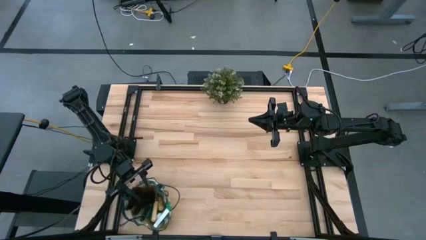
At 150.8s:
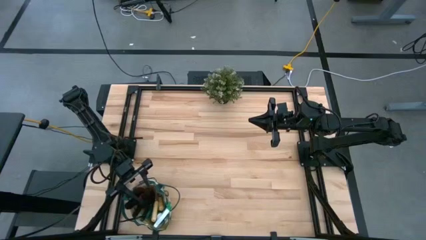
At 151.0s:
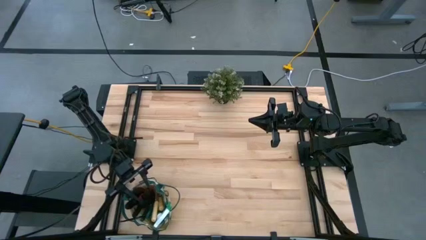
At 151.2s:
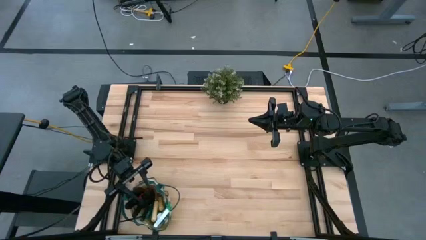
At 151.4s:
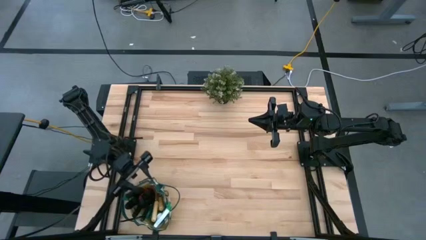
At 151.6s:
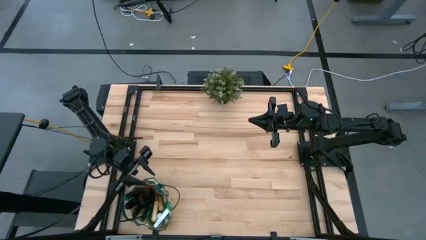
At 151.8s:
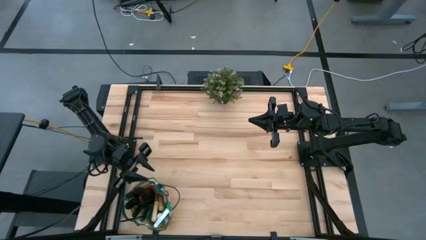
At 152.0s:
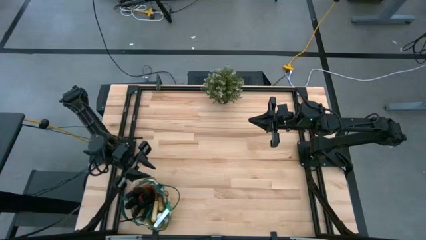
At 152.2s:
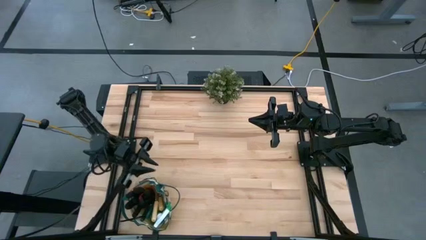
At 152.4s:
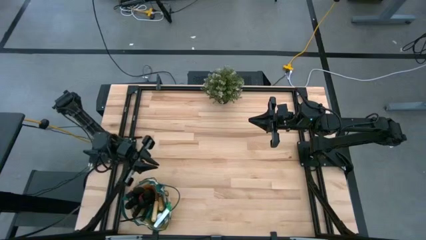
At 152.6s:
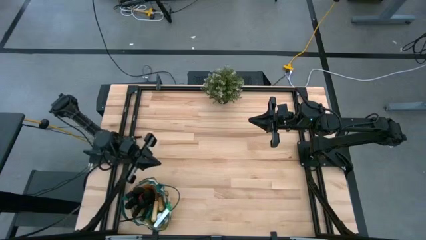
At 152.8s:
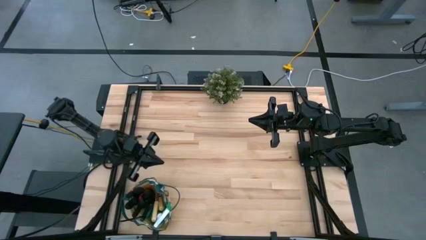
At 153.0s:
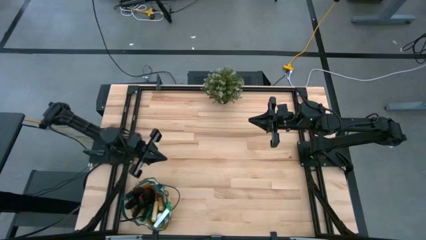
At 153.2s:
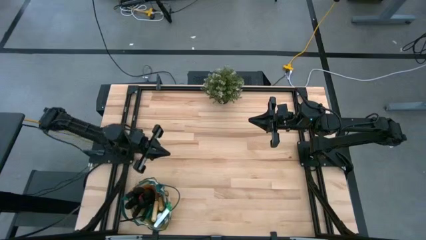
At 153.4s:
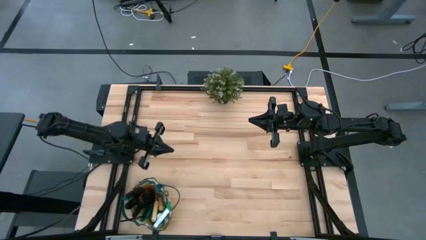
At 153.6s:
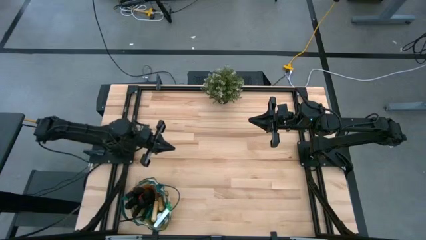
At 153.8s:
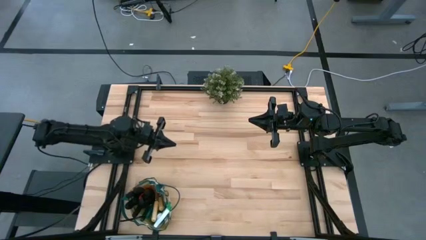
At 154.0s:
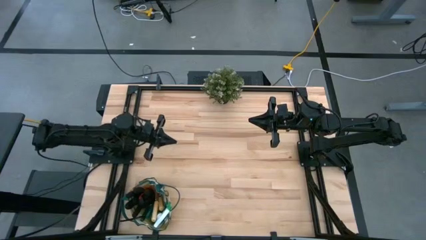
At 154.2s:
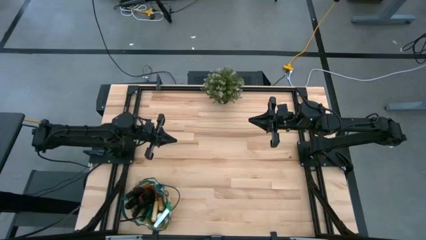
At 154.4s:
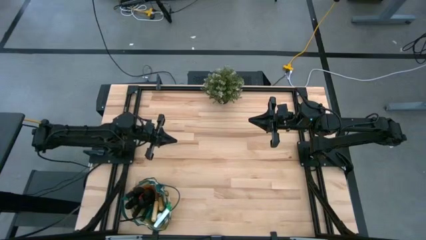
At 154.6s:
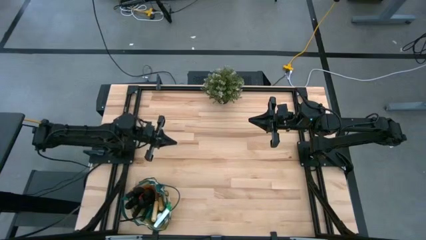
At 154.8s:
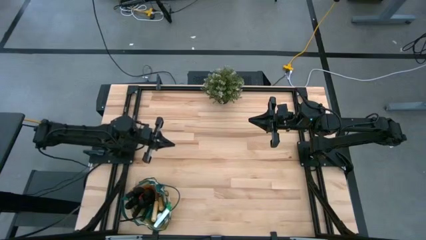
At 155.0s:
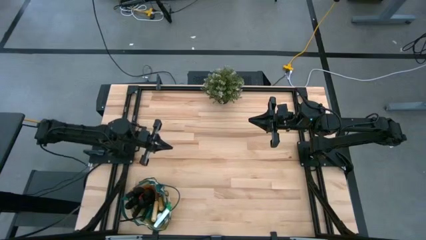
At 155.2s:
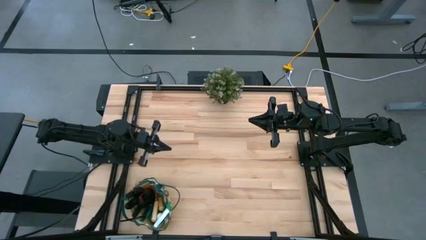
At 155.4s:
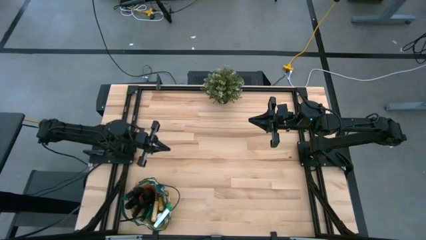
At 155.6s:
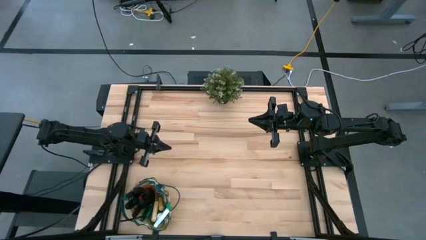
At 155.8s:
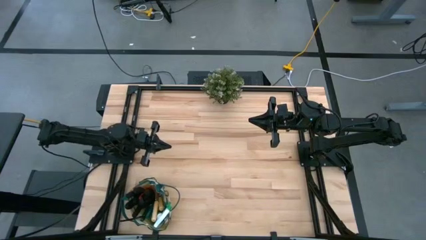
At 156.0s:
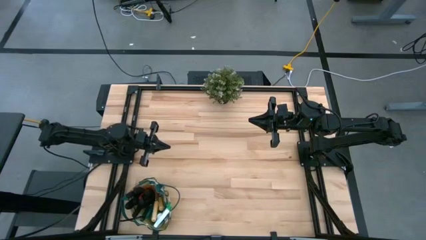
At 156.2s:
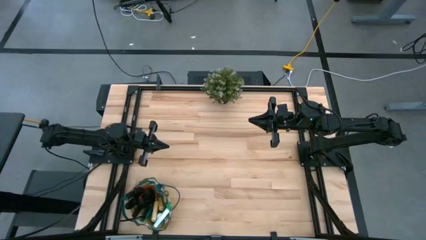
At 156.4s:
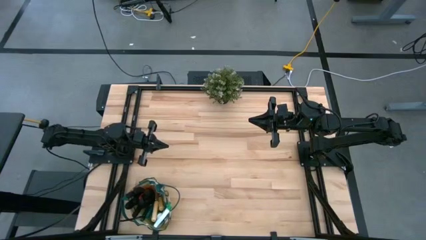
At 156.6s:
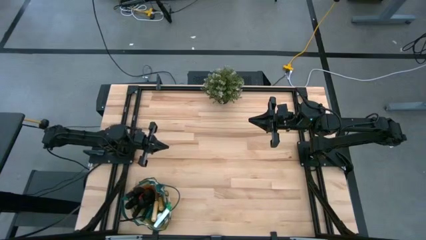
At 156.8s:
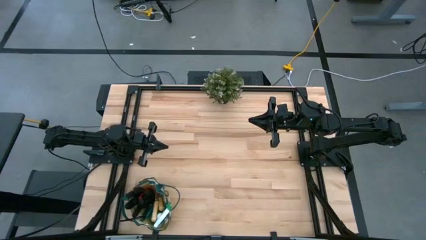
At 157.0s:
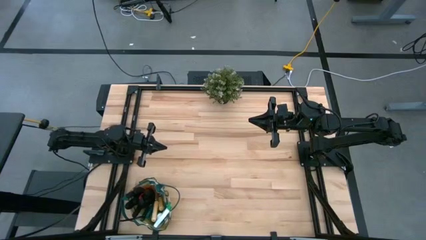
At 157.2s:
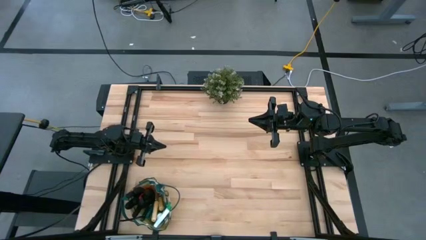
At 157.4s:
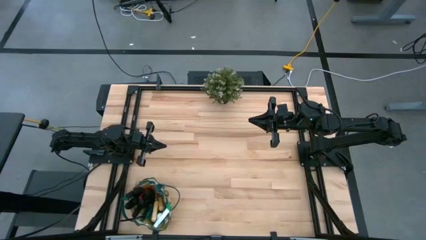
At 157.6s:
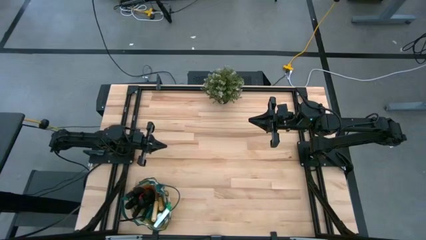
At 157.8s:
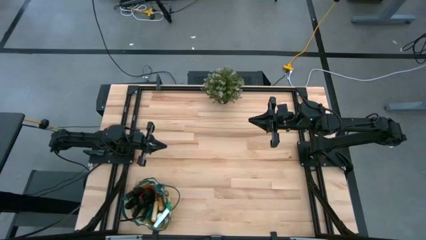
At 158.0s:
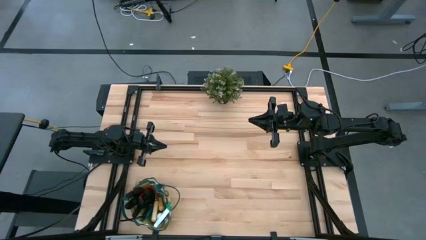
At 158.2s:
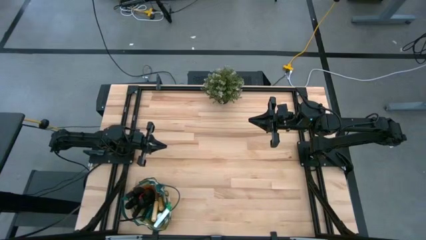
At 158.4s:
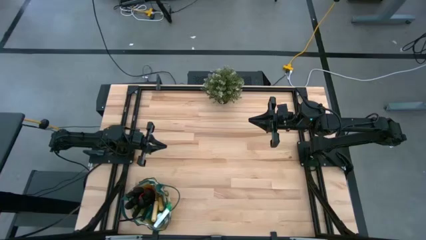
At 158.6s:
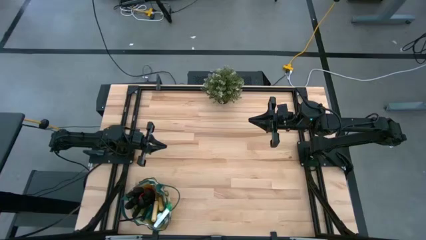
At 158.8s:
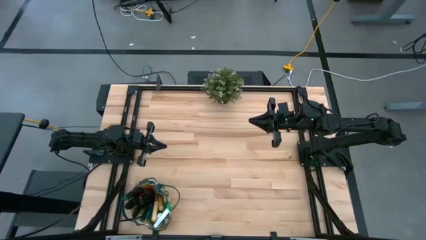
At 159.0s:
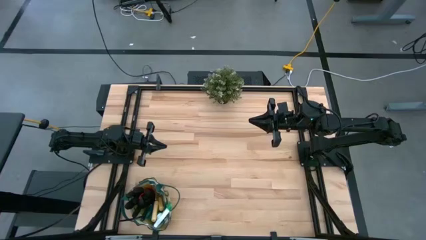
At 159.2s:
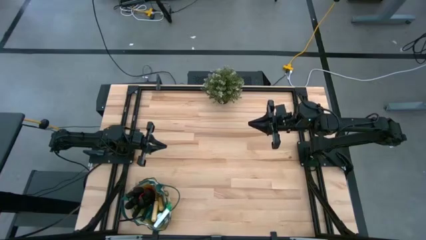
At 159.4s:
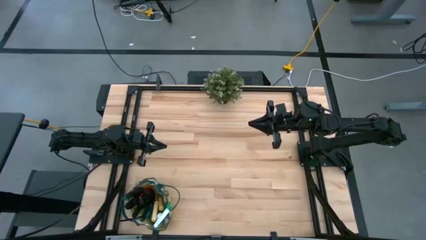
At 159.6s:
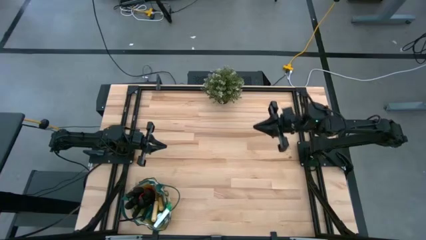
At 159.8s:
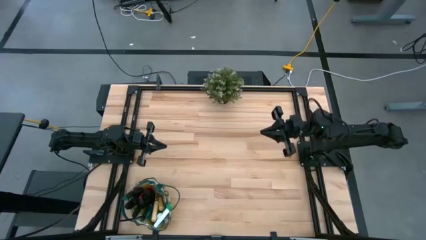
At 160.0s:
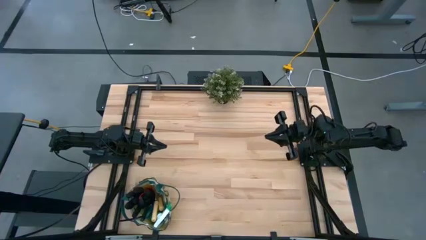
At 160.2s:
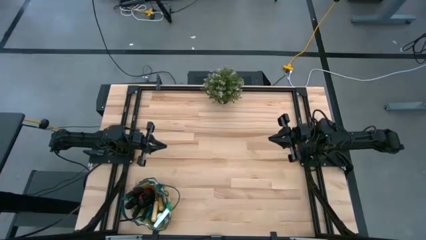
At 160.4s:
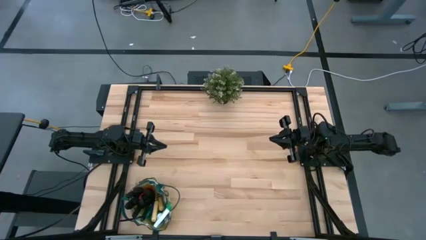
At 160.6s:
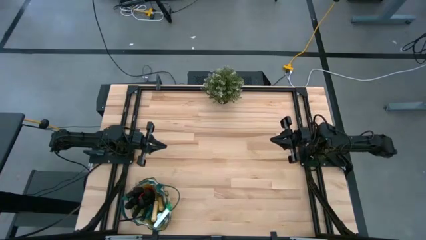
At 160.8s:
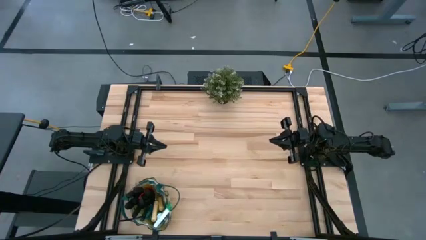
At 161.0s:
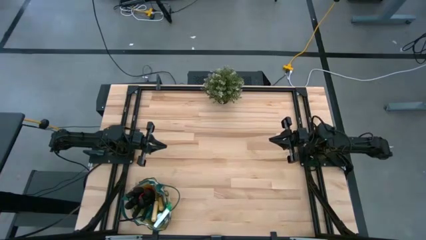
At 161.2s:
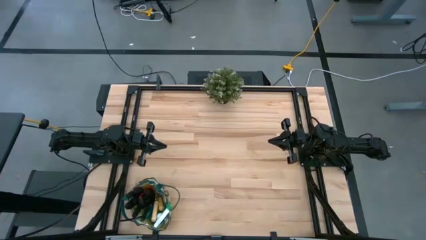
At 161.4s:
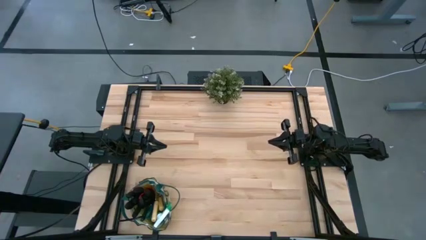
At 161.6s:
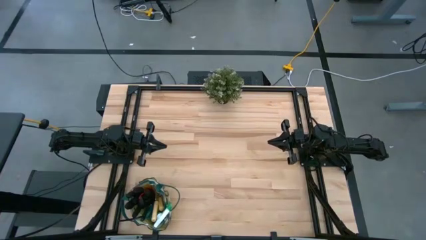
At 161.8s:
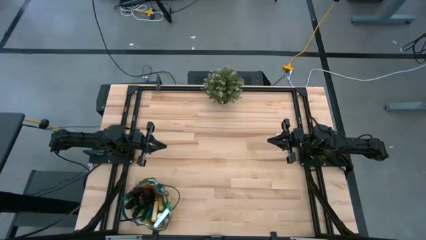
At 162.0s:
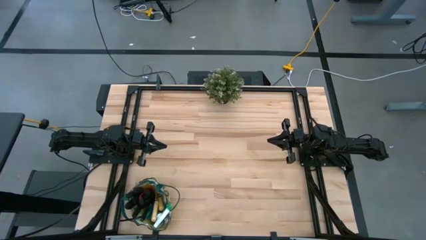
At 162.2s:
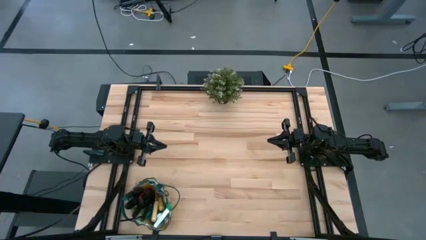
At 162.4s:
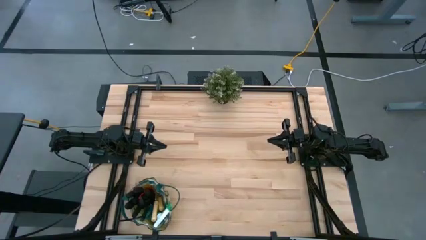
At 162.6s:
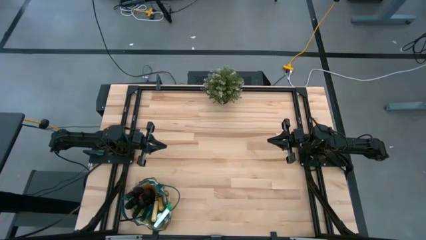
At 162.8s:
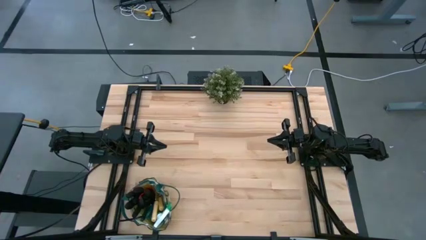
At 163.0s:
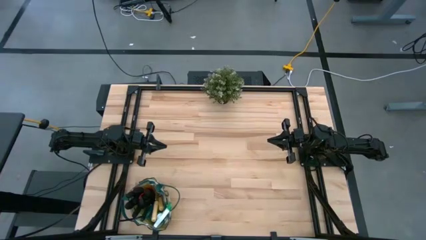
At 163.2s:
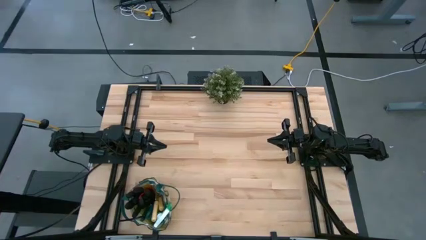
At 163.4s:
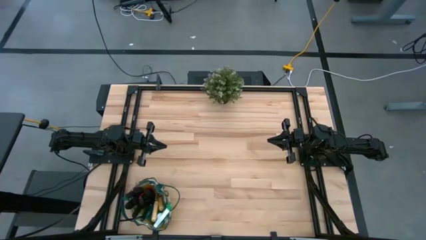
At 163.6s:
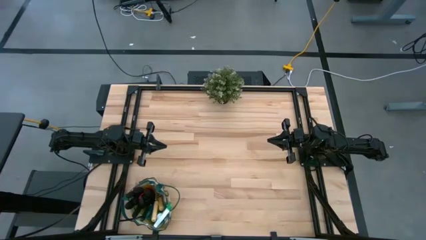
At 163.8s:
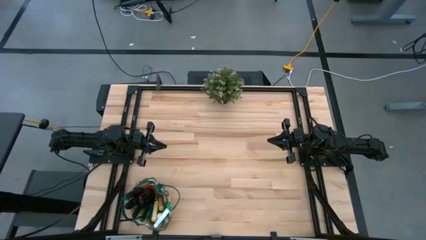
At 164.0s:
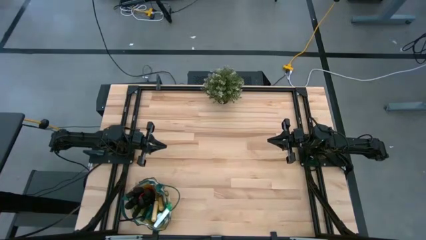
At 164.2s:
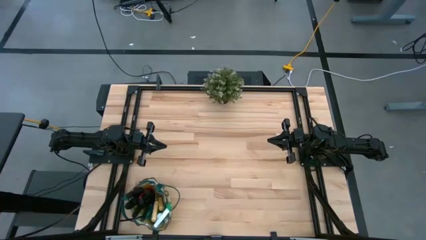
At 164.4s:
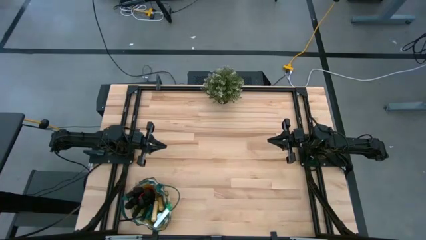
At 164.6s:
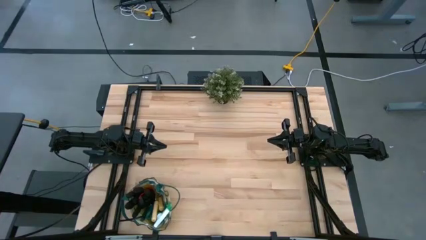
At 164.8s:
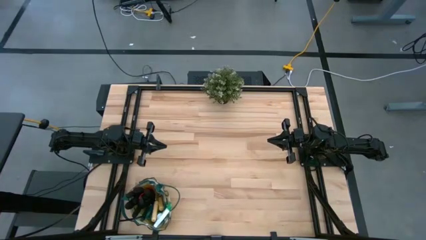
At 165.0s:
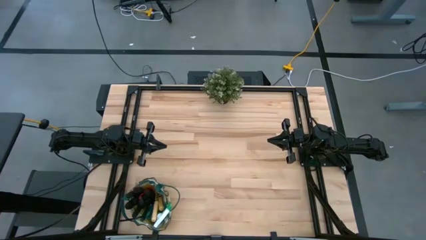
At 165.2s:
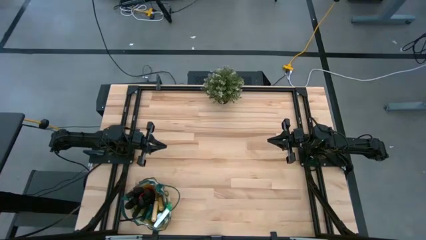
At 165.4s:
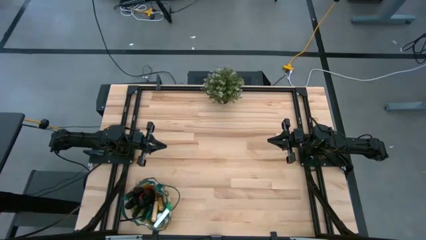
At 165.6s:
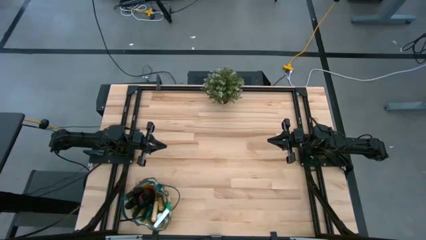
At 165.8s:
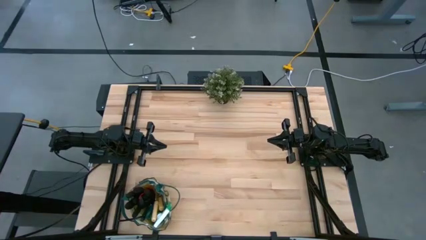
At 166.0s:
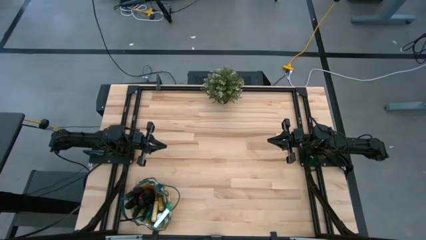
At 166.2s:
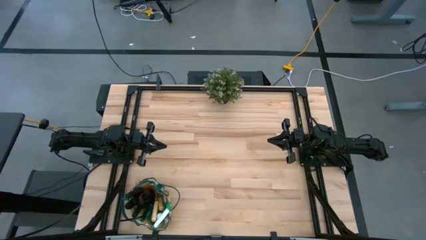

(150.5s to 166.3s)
Task: Pick & Place Garden tools in Gardening bag
Return to Home Position

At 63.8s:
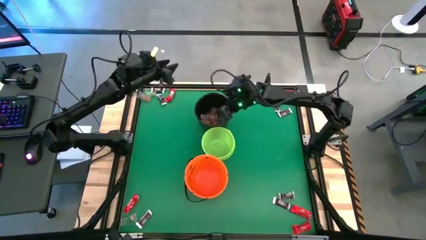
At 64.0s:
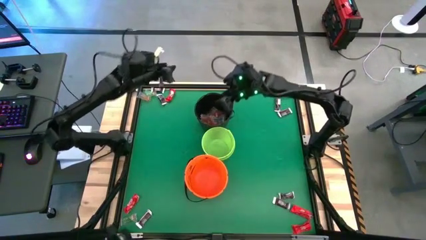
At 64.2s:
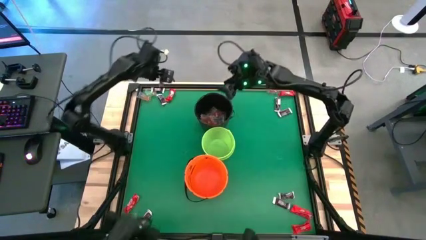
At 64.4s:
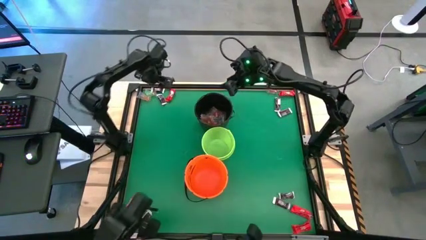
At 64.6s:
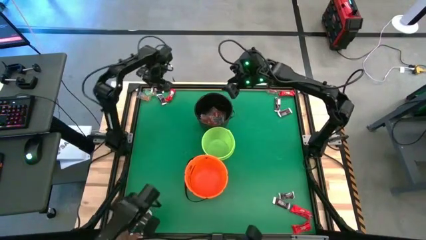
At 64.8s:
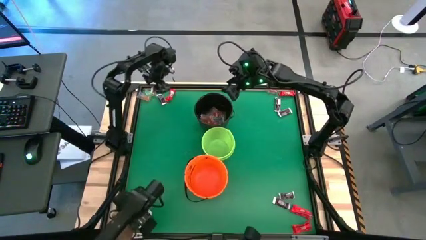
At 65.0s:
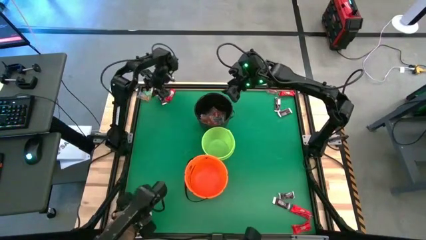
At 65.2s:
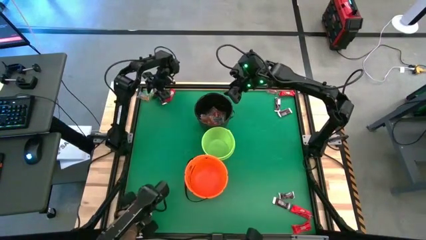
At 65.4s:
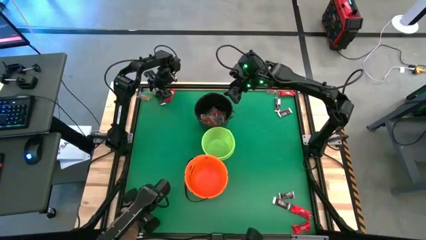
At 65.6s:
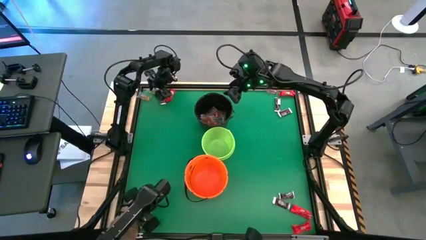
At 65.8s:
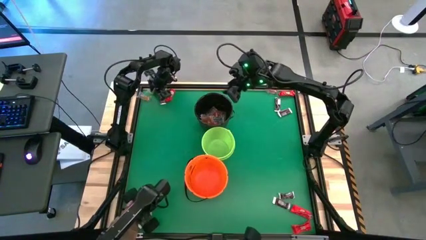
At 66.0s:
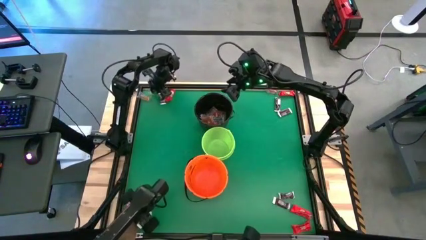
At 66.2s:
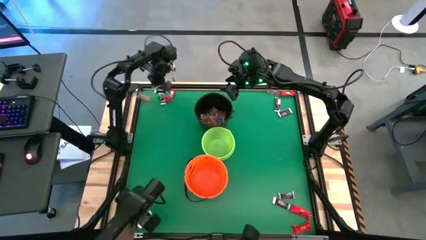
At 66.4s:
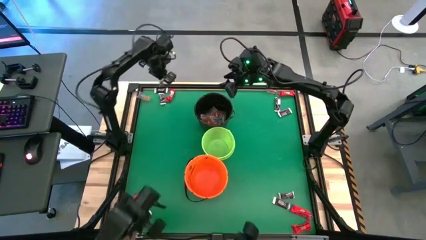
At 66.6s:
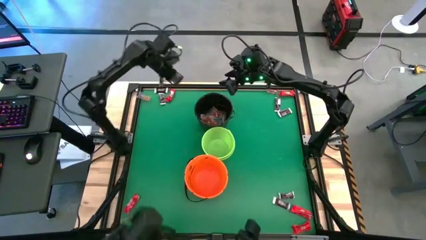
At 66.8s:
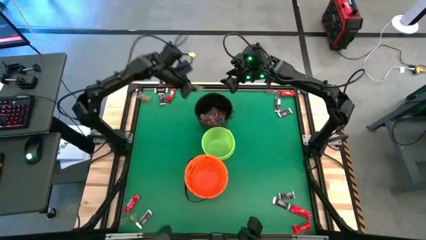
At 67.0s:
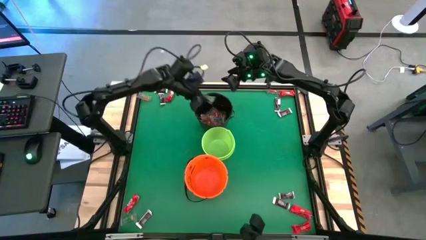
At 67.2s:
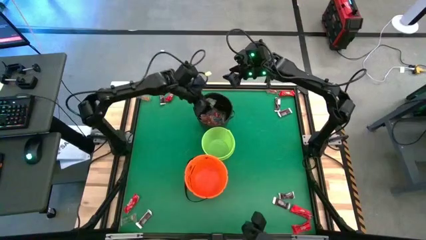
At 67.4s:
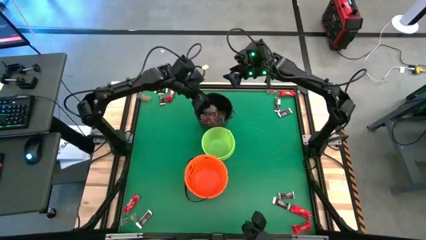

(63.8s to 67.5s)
Task: Sort candy by brand, put in halloween buckets
Put the green gummy into the black bucket
